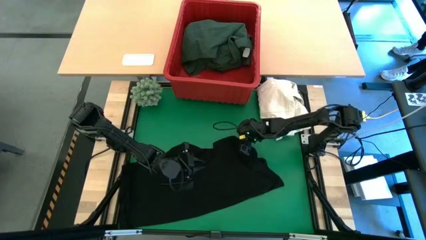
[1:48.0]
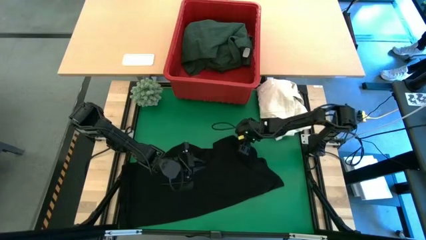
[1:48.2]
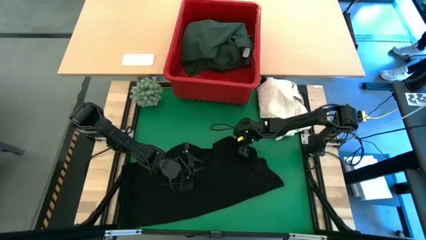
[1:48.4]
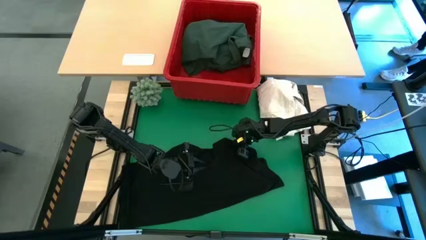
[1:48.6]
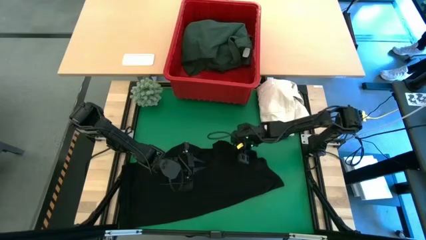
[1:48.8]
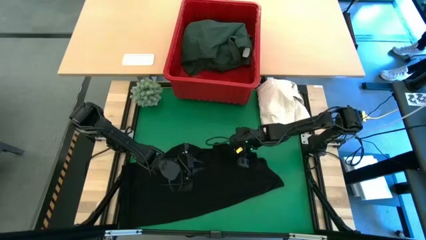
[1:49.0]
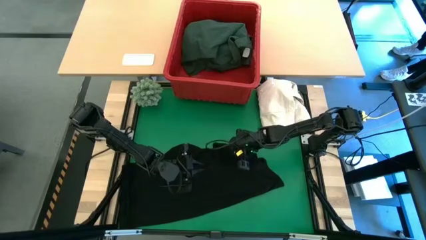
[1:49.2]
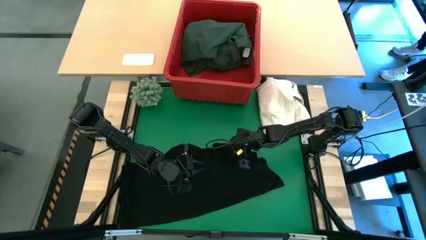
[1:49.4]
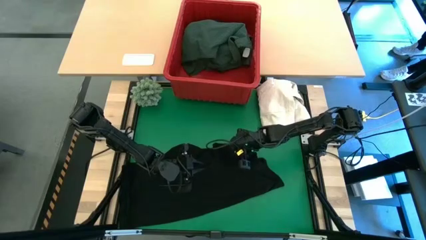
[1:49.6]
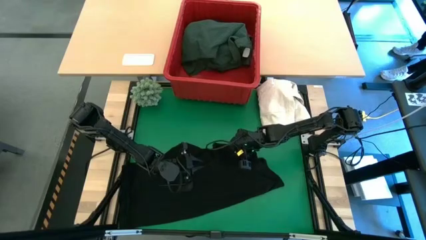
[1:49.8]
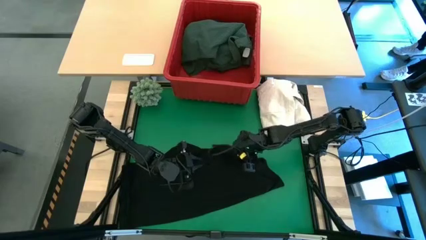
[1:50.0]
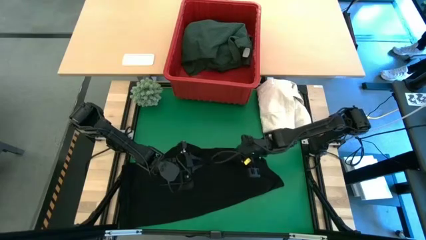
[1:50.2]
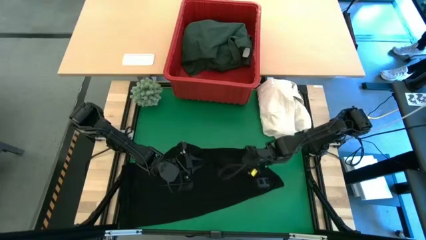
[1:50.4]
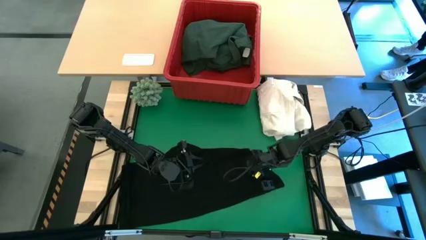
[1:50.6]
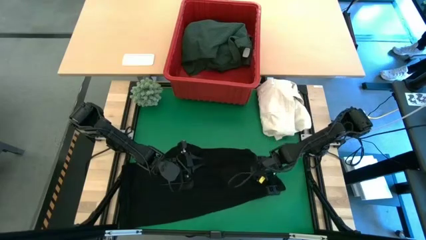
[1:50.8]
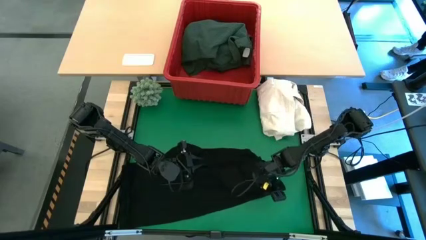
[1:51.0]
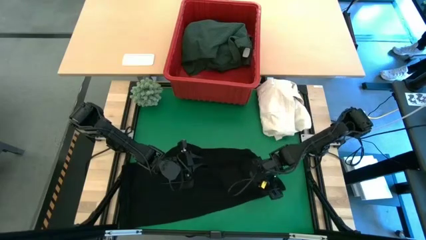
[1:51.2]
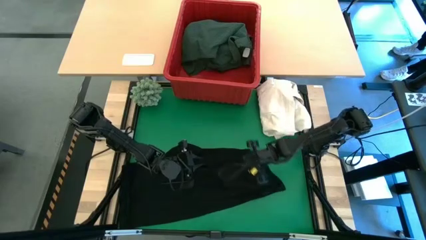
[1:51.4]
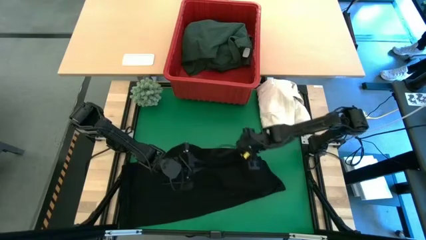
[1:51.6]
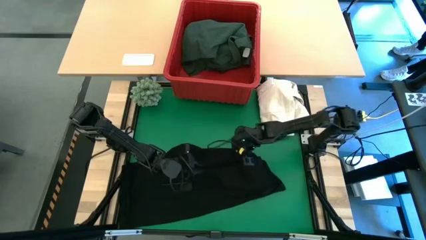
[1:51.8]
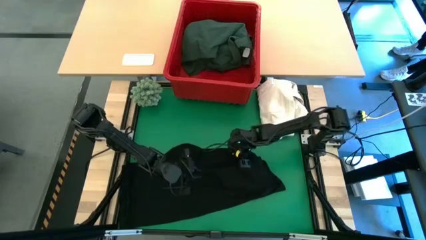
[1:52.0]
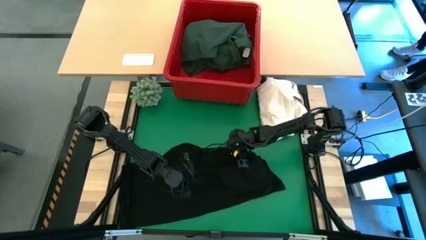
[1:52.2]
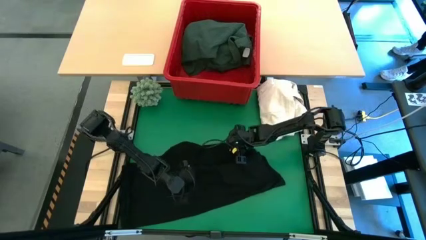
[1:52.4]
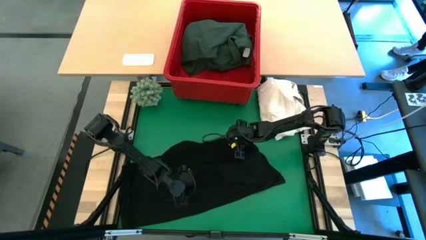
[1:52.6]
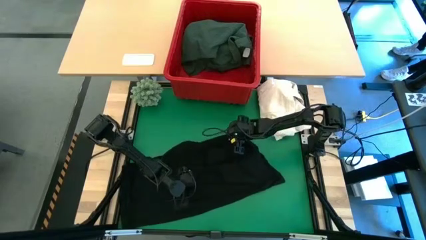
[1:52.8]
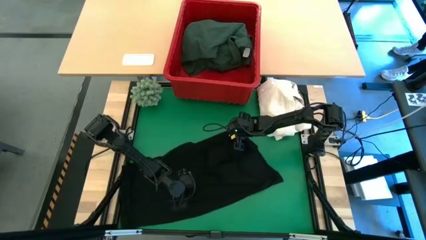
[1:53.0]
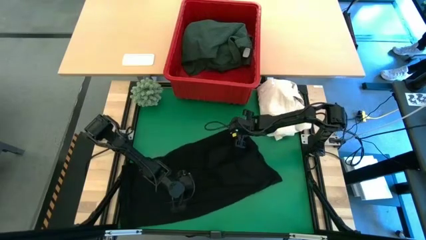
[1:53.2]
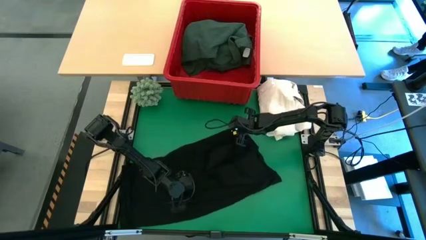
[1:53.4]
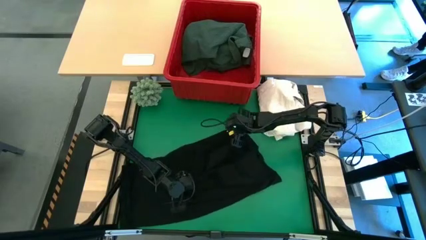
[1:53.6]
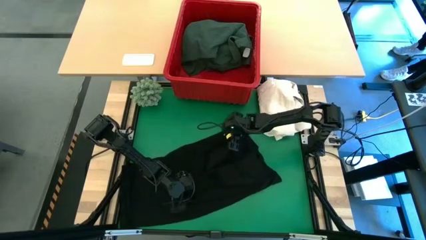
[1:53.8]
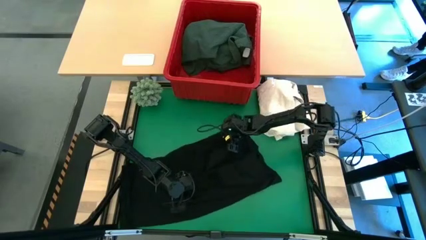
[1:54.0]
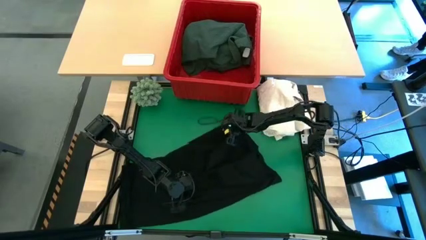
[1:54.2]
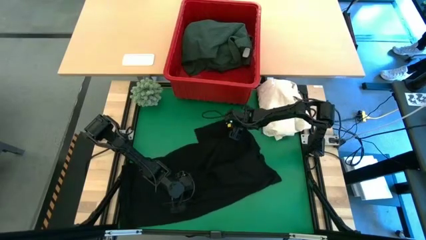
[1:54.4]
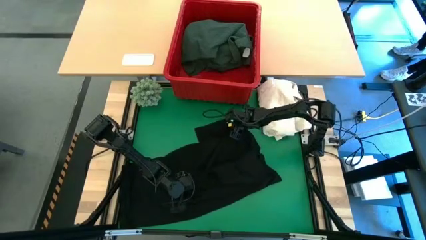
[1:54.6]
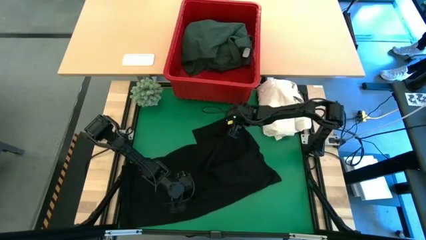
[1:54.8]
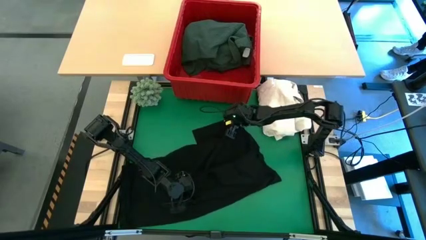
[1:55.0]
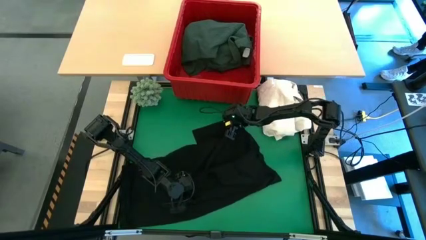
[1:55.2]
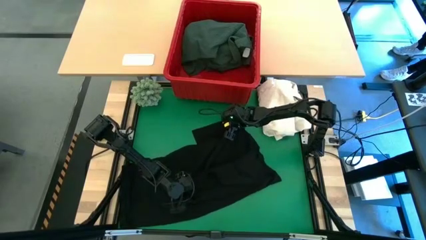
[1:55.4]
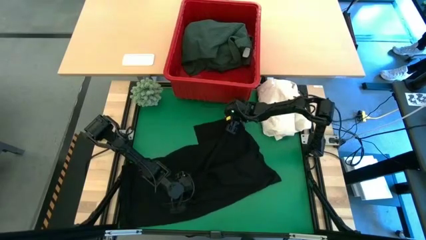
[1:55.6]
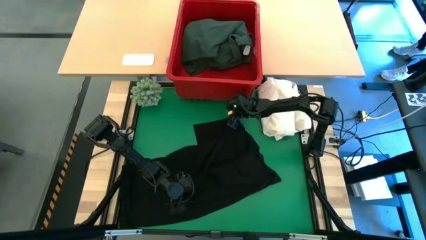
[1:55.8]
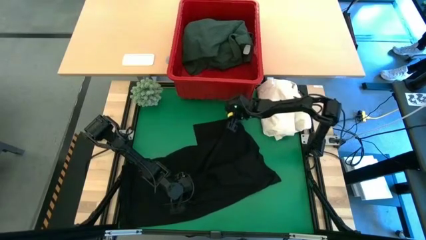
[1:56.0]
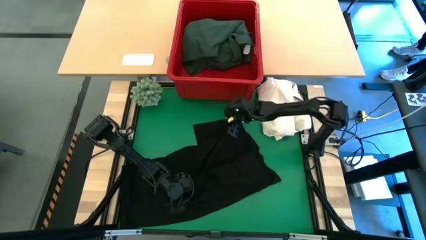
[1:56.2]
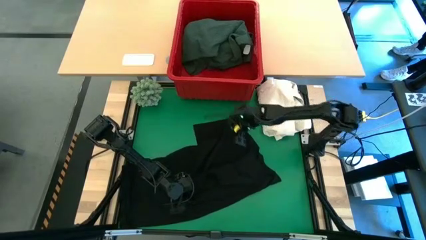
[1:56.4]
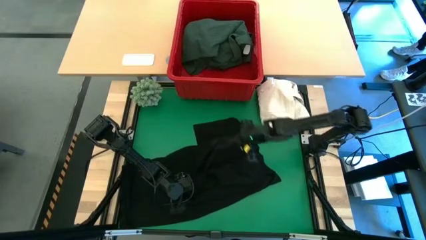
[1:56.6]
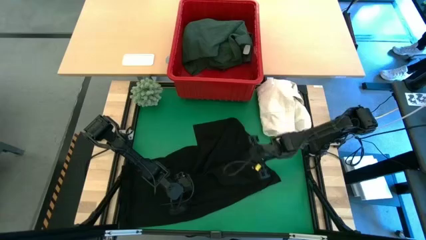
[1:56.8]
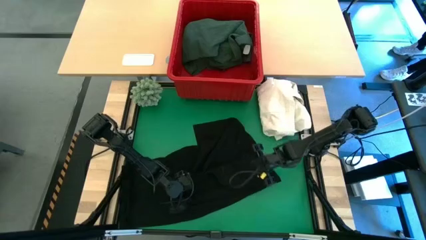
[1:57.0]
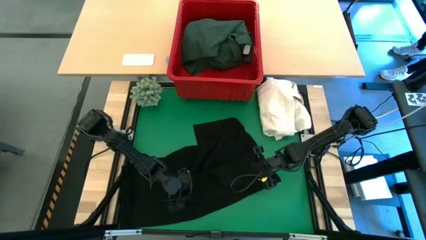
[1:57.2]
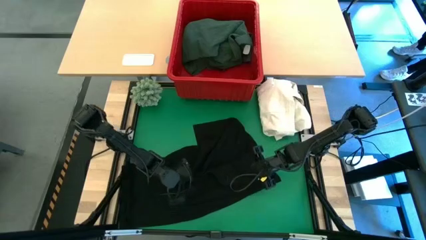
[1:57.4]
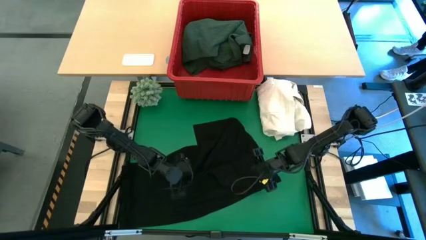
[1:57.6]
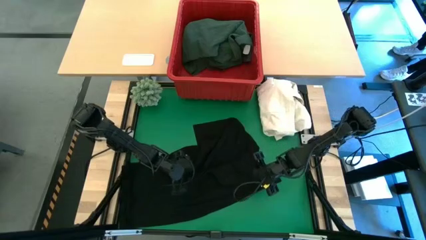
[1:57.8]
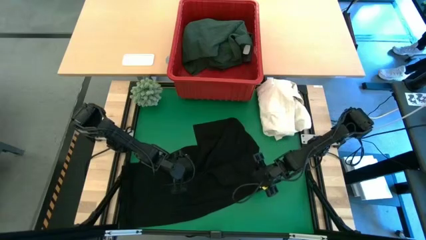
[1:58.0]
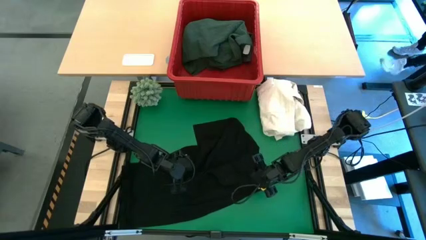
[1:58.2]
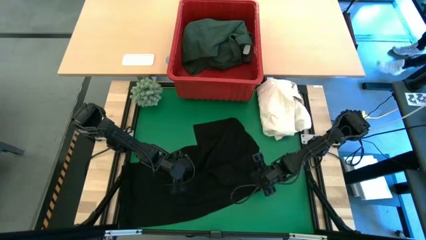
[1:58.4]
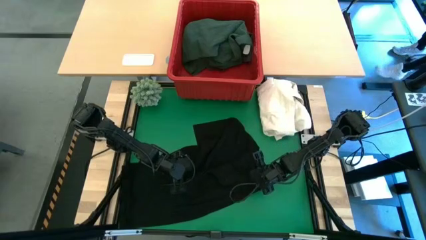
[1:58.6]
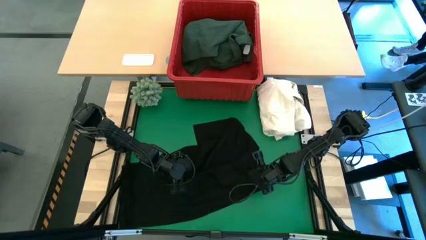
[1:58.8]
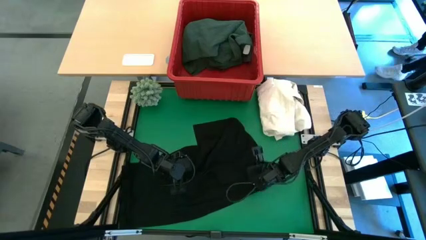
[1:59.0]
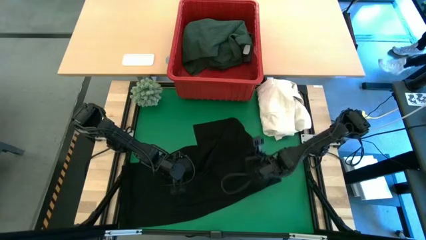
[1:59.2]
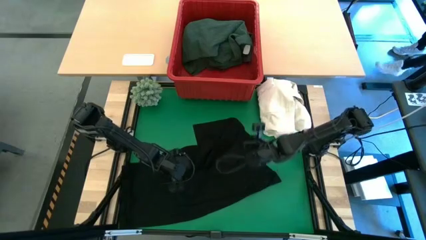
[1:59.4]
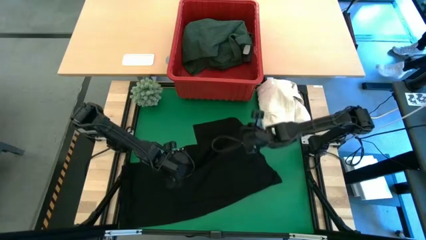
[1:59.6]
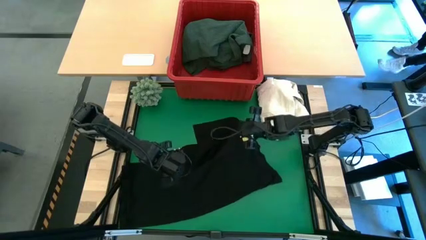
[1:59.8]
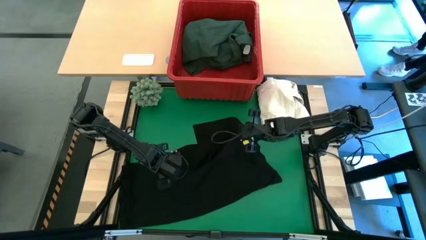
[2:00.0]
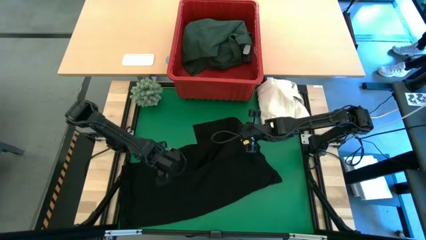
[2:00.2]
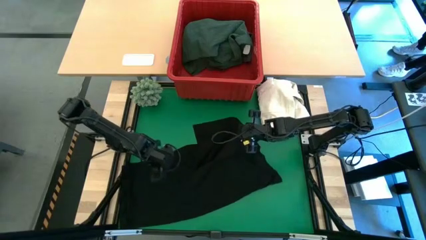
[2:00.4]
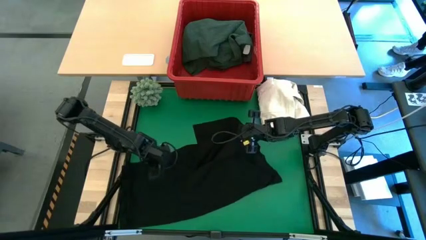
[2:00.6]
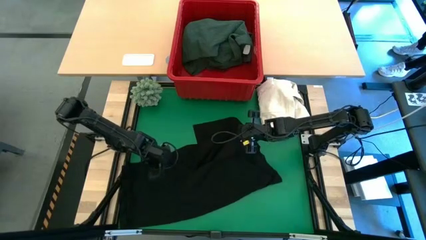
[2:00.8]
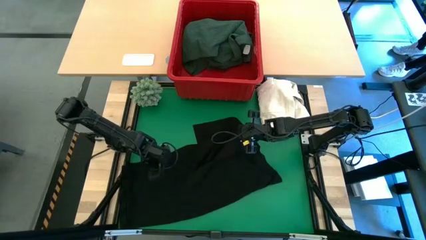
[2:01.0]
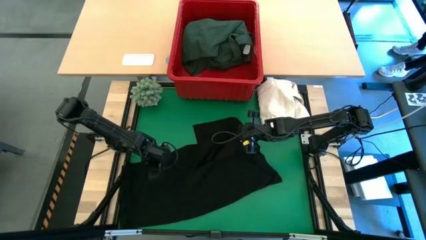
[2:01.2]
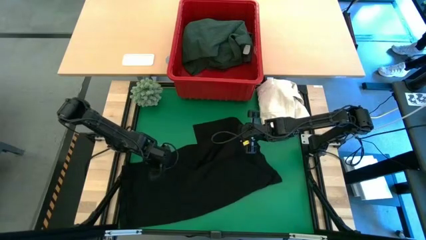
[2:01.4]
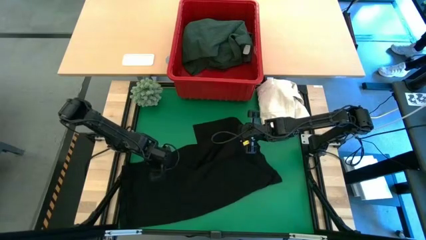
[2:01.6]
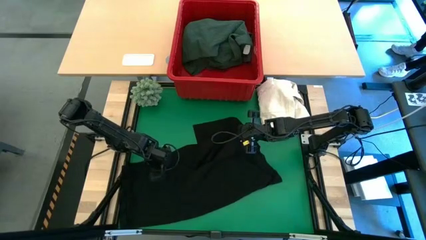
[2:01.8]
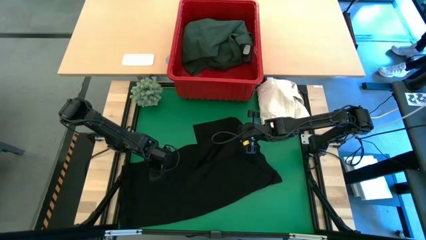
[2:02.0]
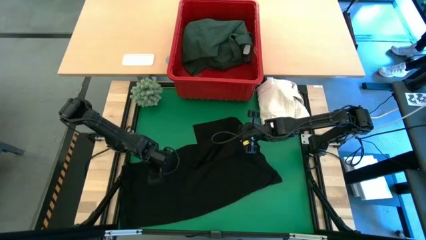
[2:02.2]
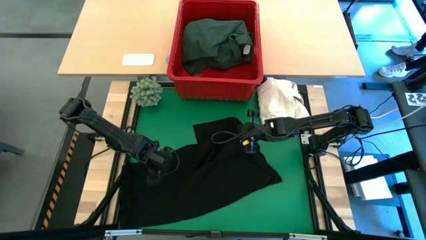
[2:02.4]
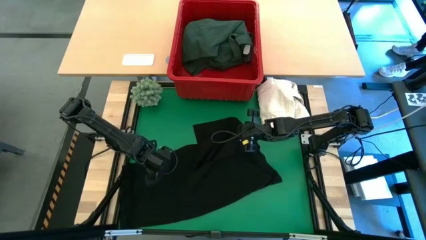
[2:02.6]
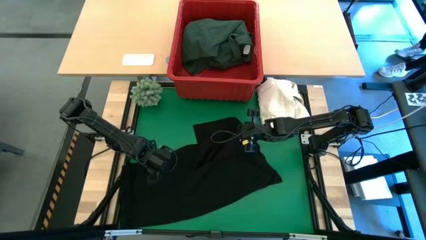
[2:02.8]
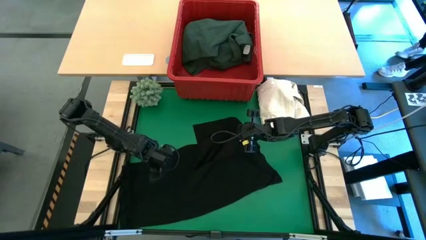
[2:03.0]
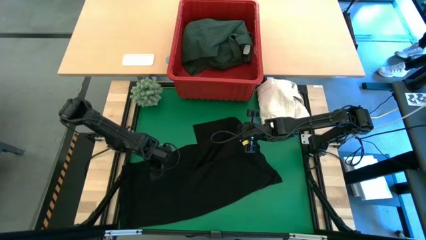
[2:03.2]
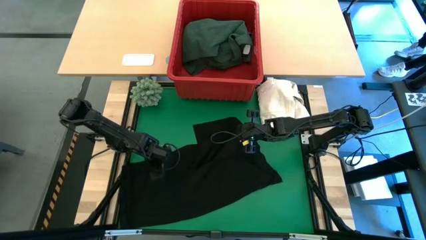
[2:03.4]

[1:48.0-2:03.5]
Task: Fold laundry
Fold the black shirt

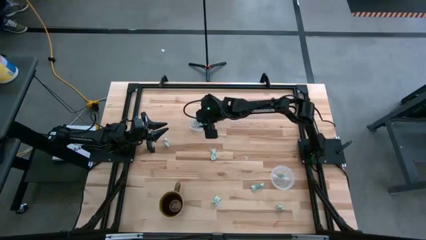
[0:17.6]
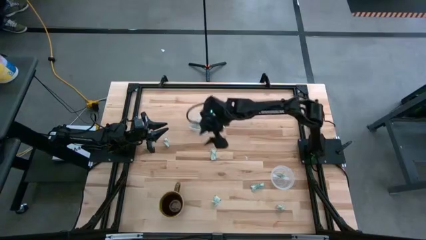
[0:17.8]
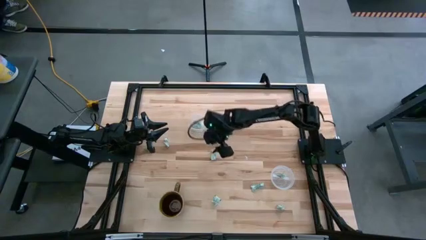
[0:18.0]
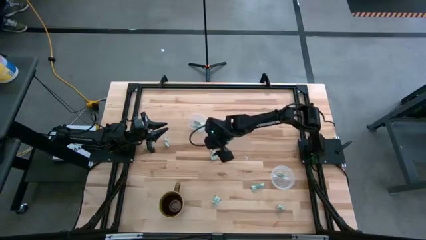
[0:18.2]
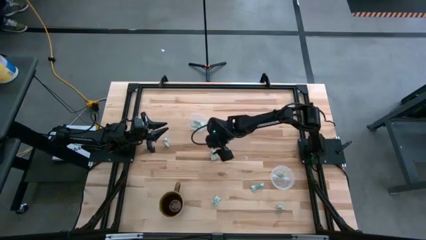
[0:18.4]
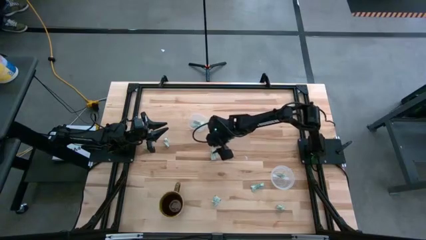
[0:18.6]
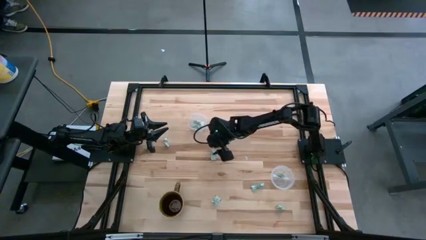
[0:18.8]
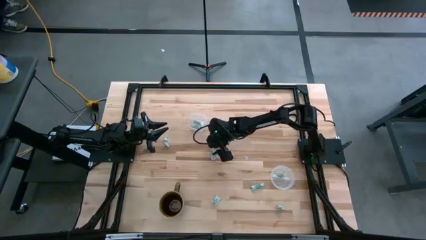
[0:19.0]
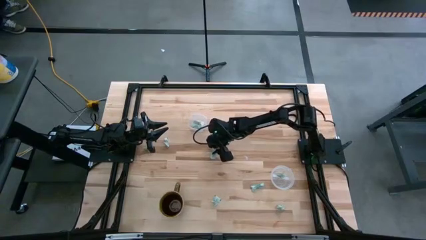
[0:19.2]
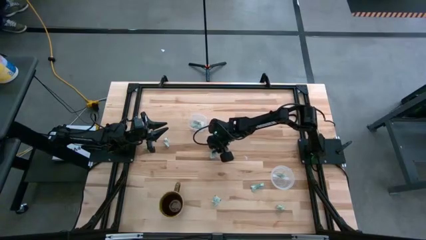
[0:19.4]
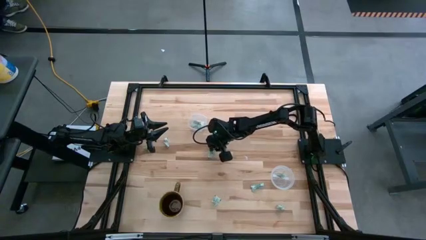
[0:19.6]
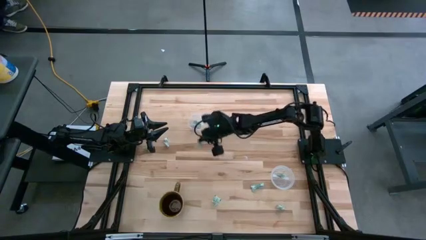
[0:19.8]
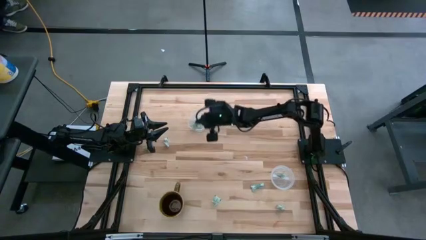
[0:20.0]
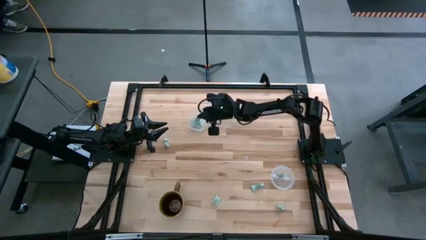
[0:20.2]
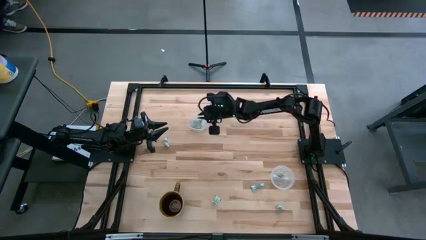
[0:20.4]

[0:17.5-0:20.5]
Task: Pick and place items into bin
Put the white stevia packet into the top transparent bin
